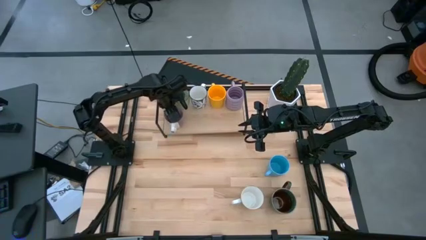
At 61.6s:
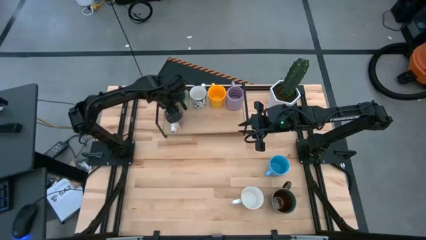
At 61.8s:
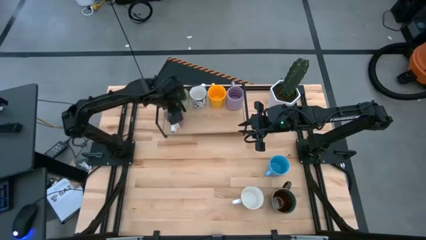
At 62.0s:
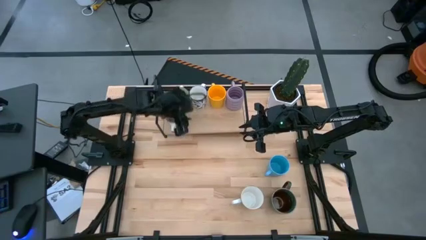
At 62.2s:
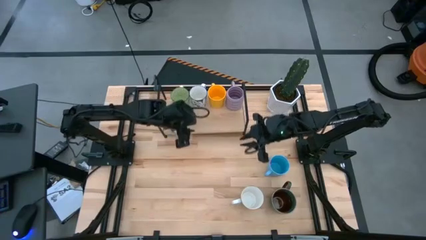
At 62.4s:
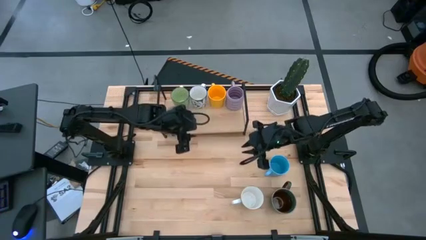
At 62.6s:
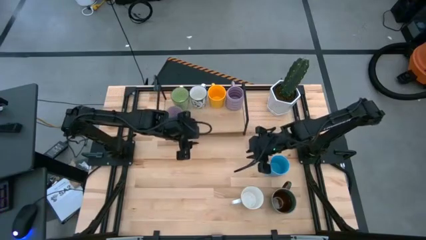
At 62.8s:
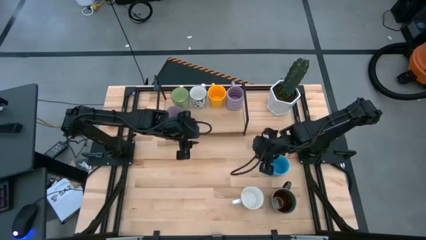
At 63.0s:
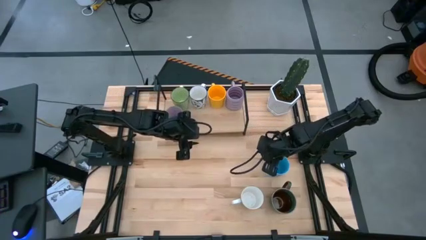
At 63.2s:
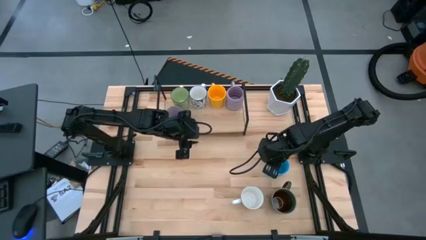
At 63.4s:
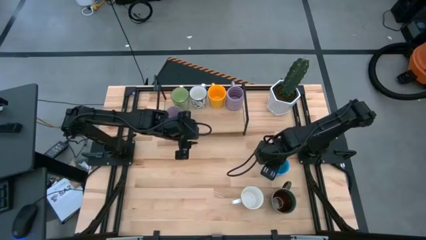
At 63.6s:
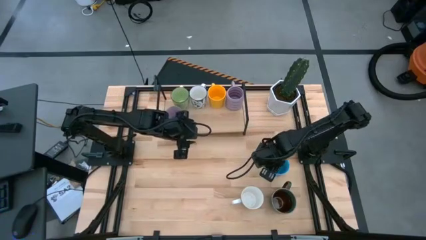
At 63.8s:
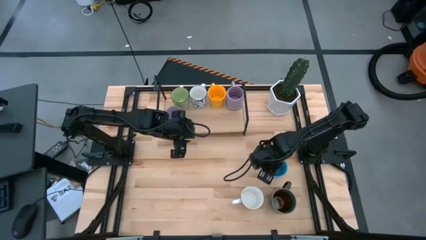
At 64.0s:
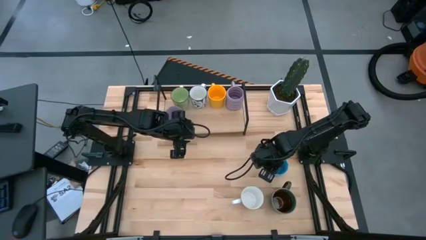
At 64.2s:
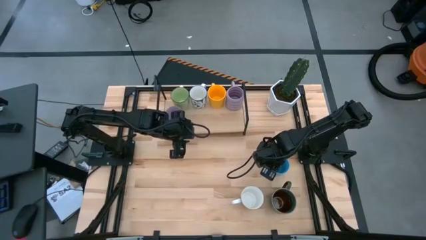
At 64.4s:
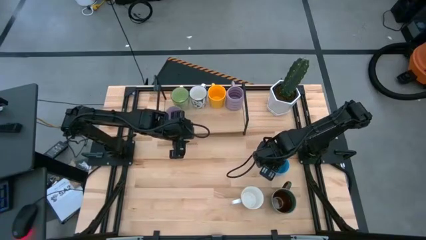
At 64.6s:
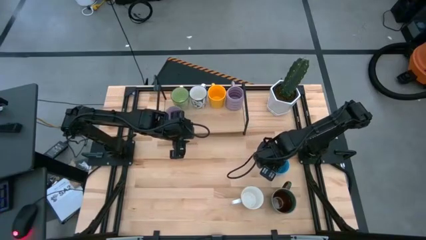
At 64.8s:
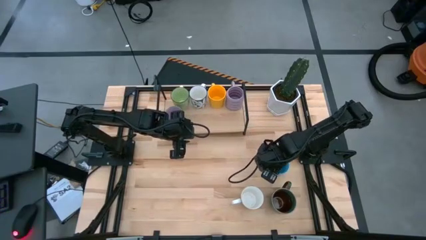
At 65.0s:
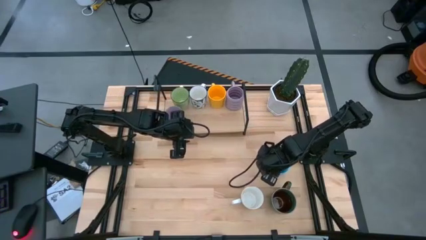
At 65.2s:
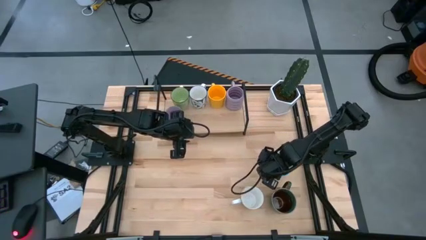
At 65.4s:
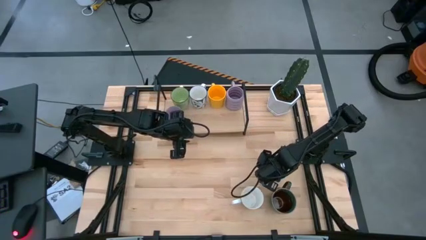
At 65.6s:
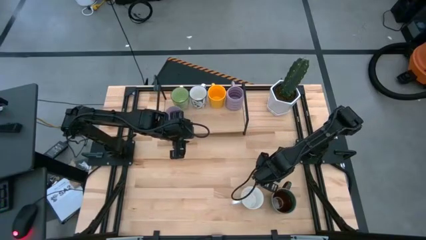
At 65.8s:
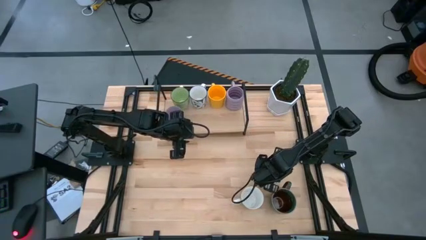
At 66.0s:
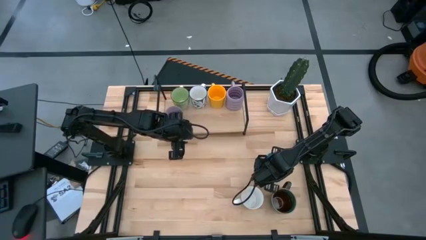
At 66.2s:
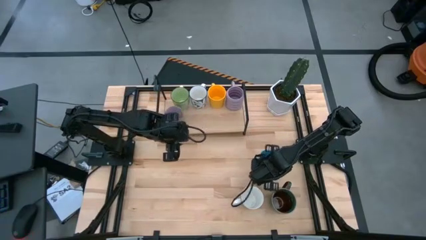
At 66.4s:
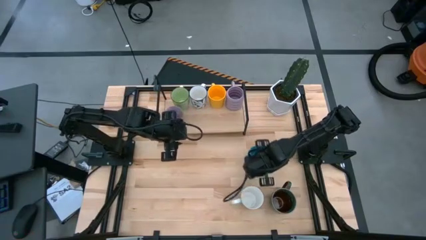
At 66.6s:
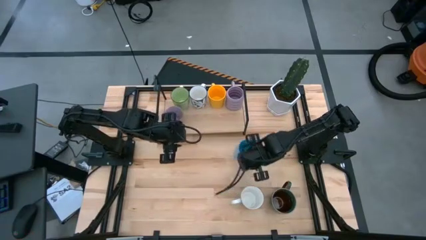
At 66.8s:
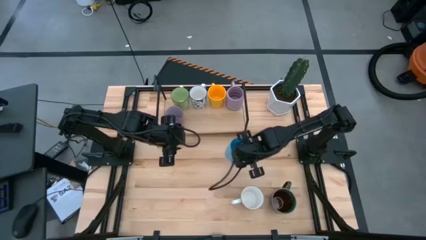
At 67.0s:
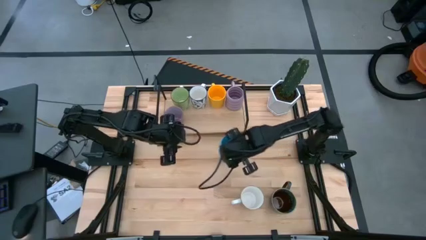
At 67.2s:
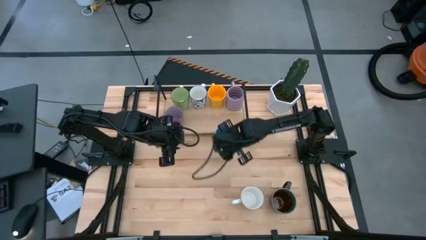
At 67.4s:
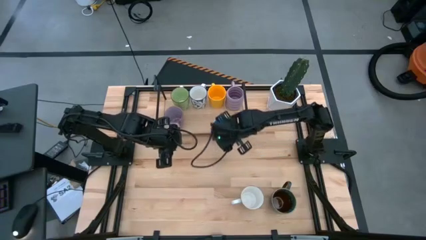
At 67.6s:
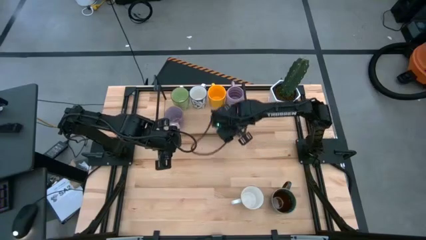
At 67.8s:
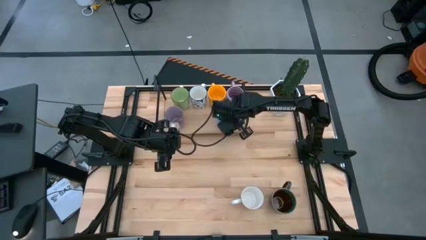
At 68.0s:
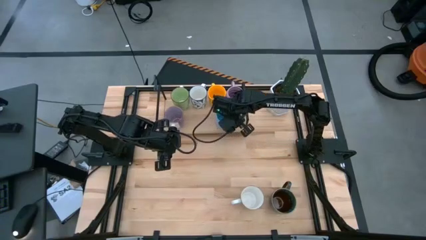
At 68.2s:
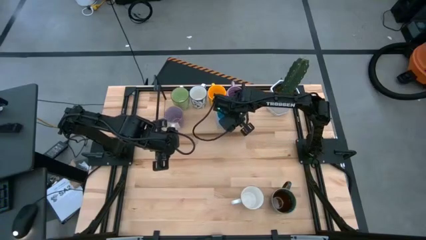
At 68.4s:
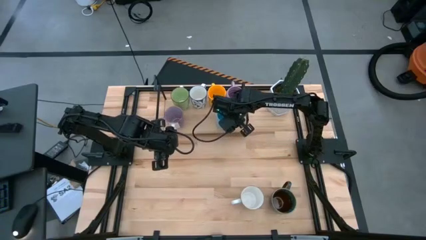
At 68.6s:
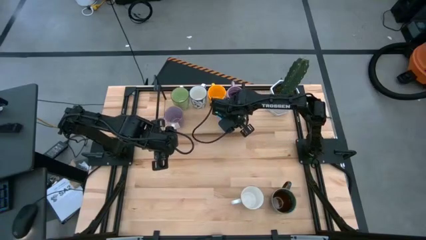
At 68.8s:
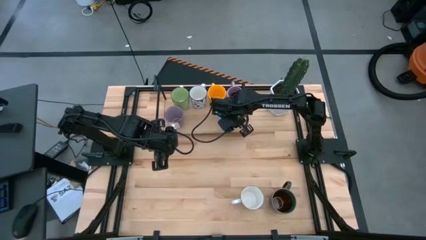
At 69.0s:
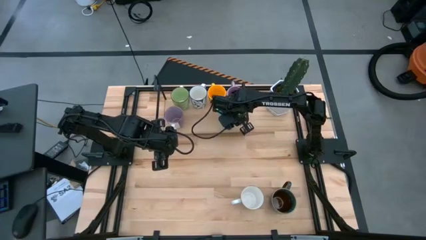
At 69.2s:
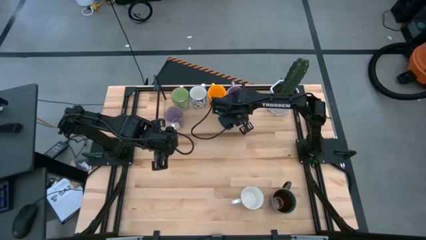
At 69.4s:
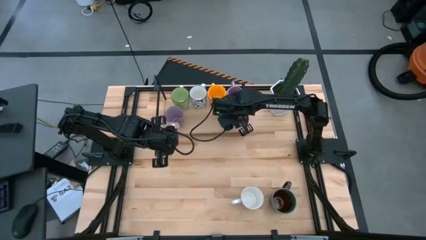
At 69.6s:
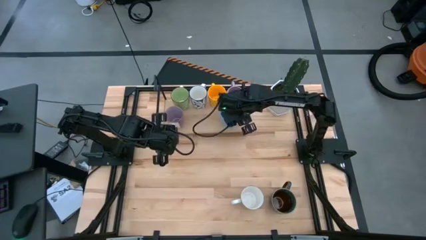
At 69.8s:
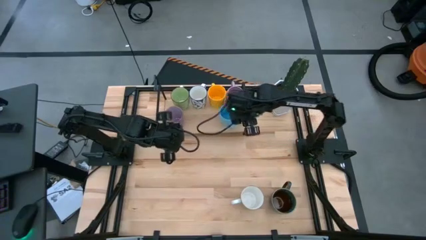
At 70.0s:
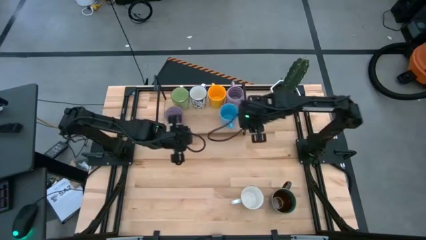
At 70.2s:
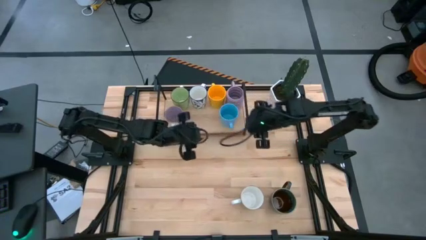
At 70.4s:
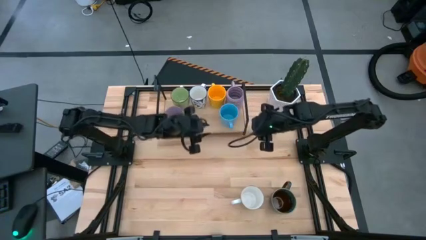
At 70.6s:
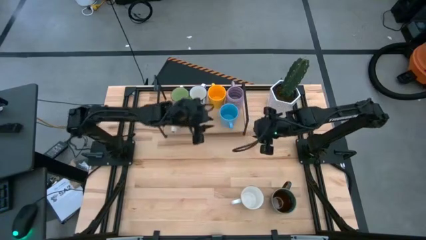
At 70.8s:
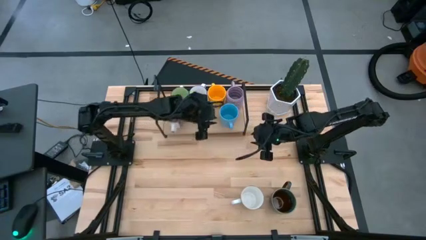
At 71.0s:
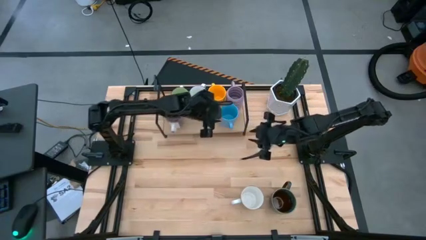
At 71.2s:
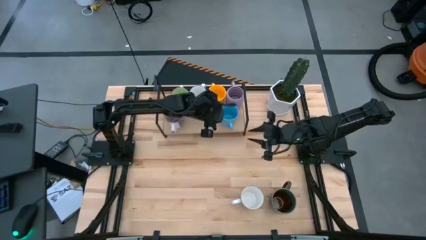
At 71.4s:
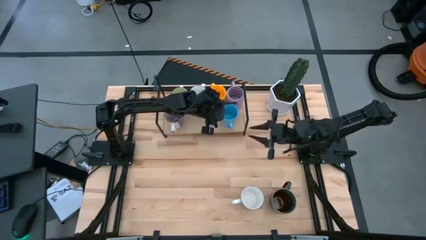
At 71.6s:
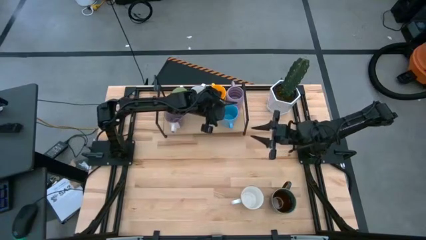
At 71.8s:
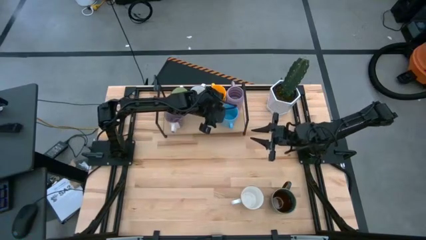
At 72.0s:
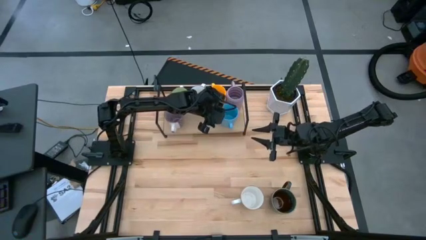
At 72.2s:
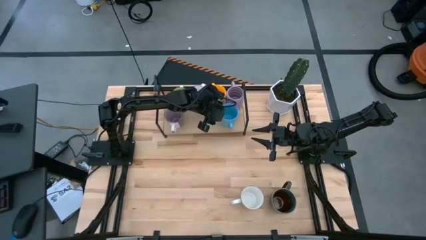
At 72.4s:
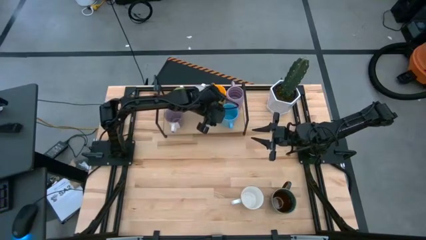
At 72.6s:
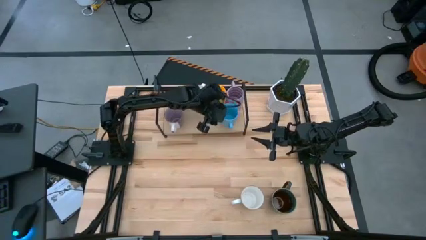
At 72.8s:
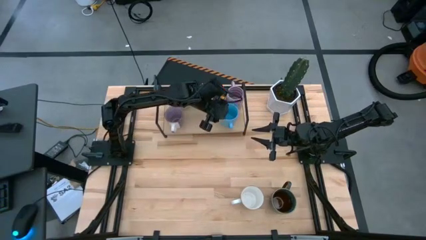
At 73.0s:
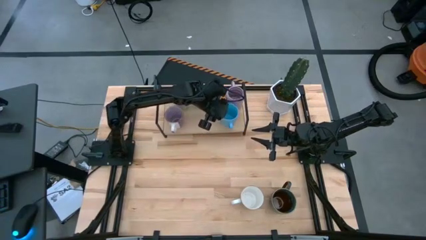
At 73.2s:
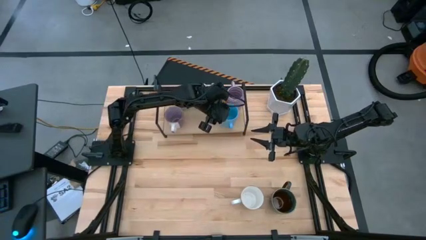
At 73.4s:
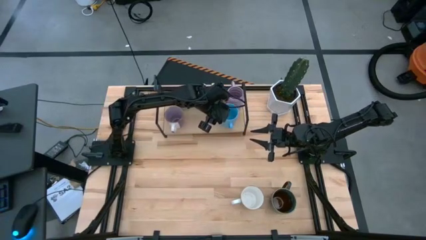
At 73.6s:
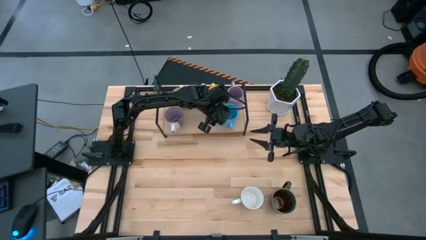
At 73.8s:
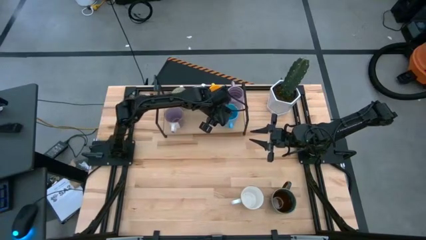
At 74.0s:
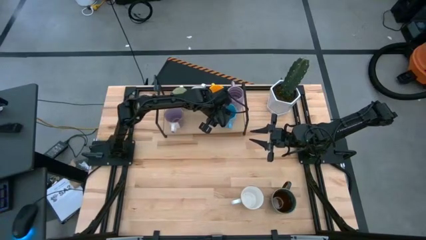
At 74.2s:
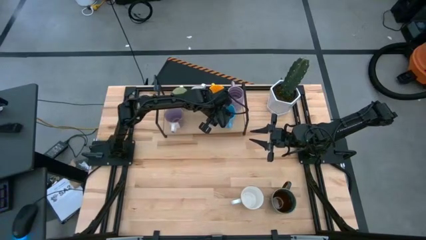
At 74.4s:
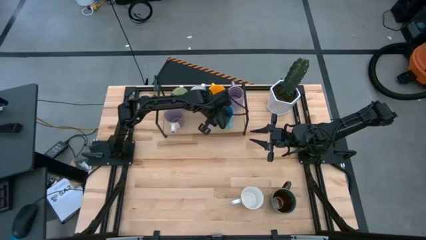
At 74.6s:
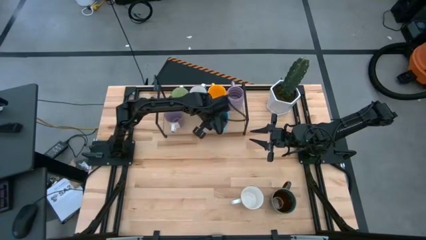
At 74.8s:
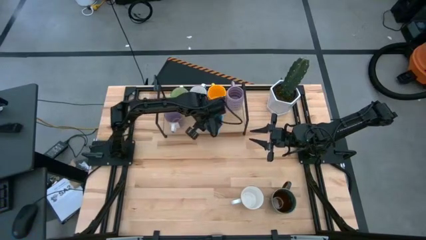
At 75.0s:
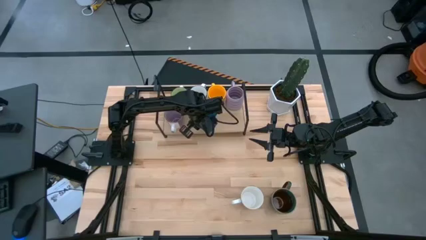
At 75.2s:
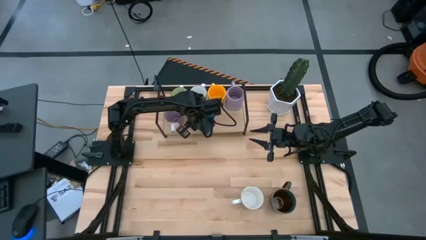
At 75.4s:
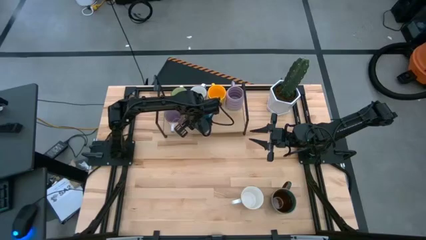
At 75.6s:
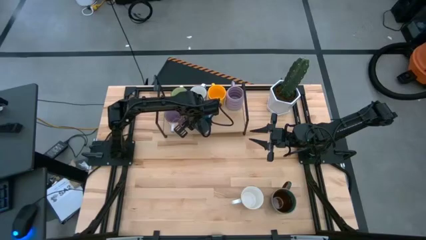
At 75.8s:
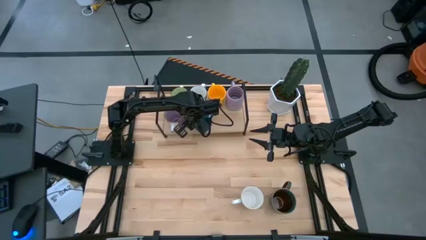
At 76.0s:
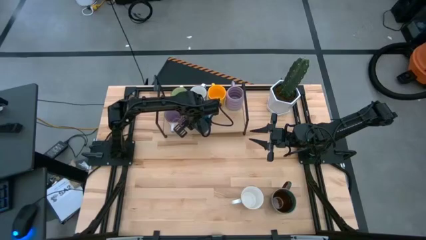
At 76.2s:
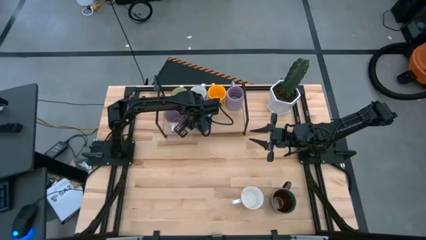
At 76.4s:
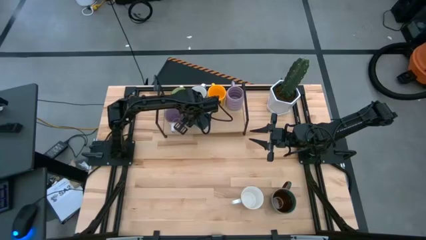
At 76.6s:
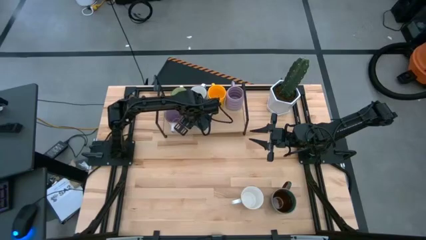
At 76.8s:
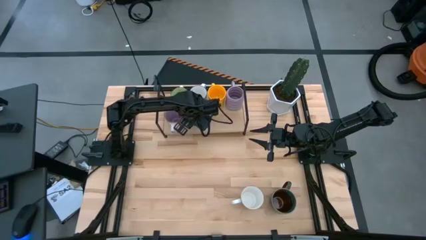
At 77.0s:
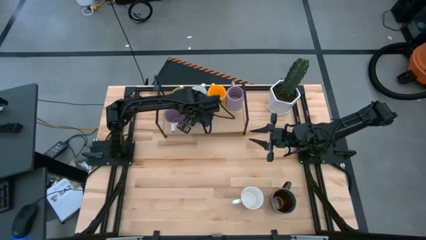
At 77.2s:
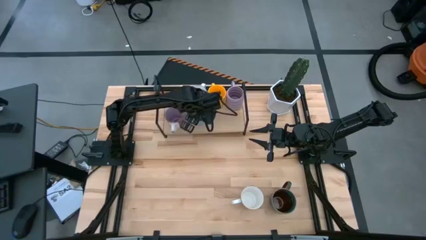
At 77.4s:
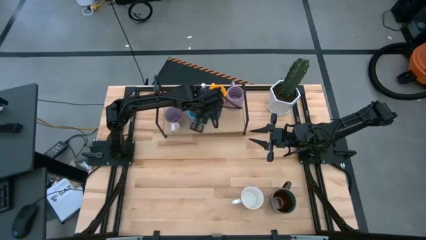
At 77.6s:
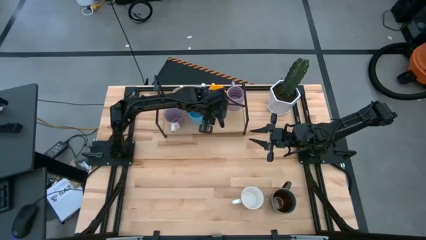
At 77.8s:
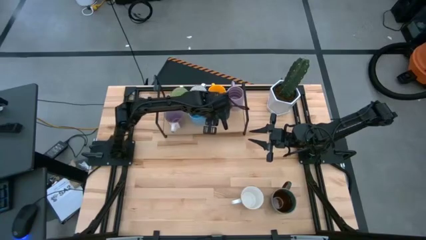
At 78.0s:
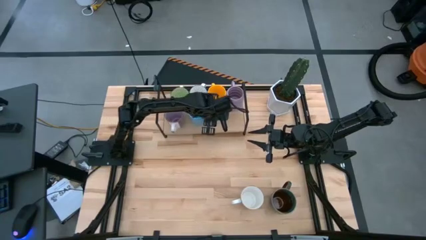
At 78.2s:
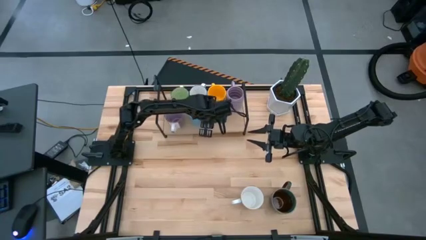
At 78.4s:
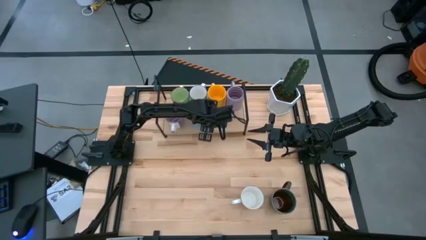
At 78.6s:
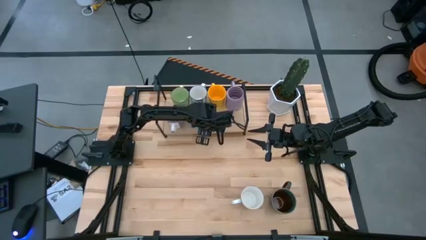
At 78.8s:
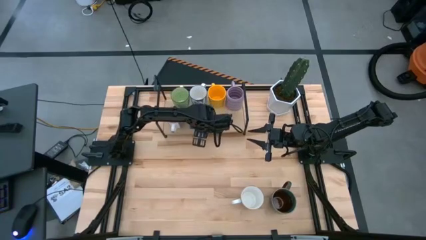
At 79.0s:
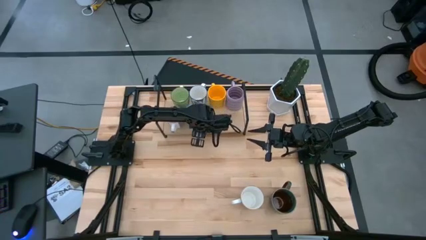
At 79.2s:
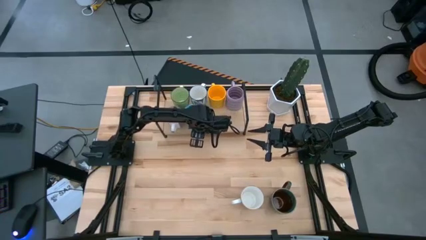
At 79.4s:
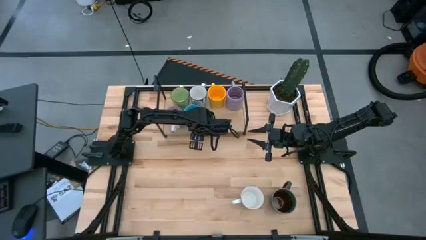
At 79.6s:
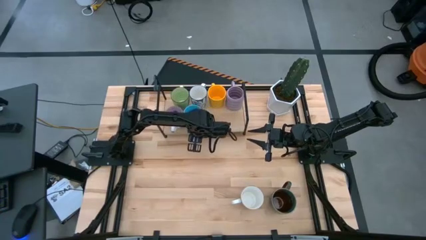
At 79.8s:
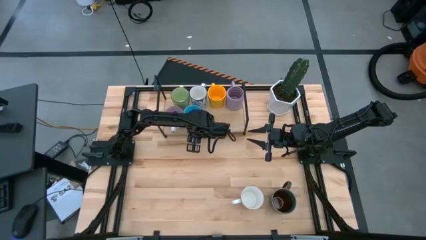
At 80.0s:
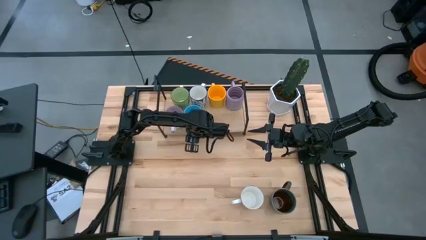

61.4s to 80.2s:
Task: Place coffee mugs
Put the light blue mug on the shelf aligned with the blue mug
